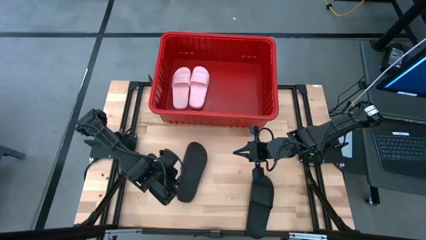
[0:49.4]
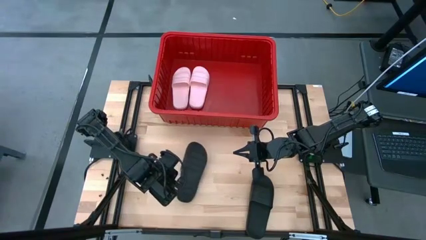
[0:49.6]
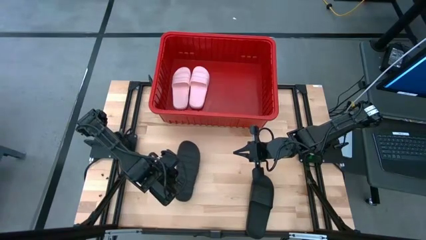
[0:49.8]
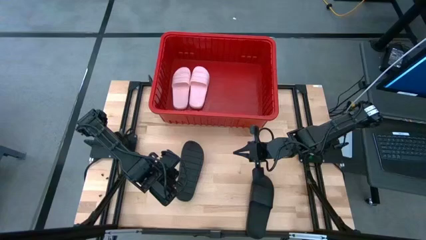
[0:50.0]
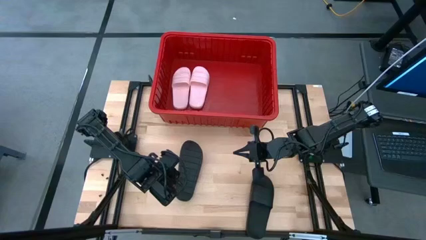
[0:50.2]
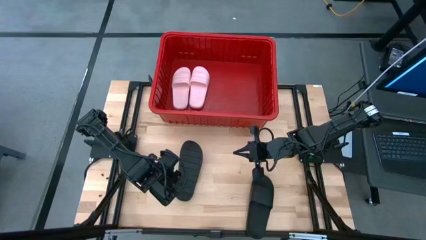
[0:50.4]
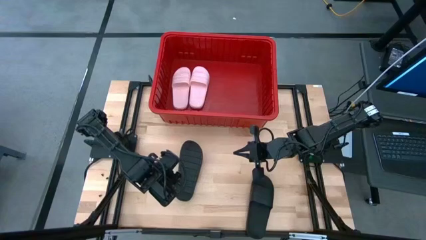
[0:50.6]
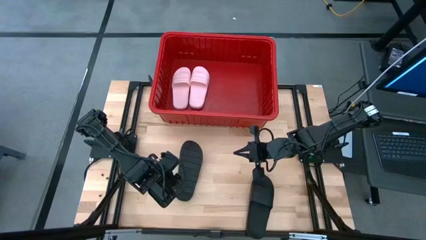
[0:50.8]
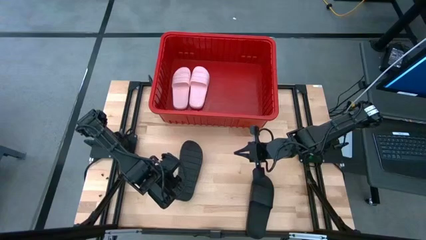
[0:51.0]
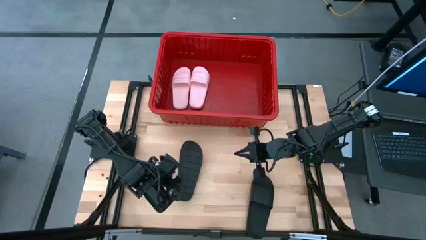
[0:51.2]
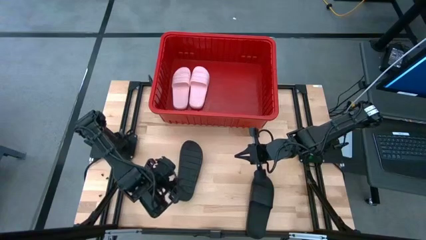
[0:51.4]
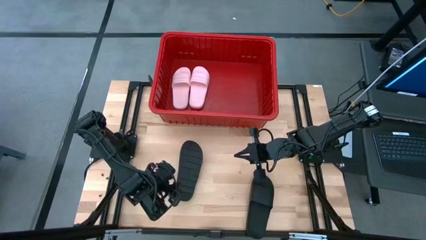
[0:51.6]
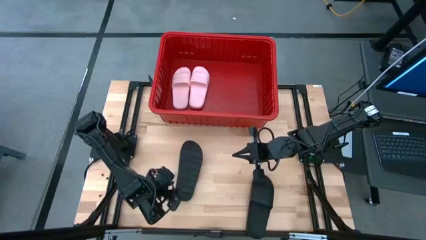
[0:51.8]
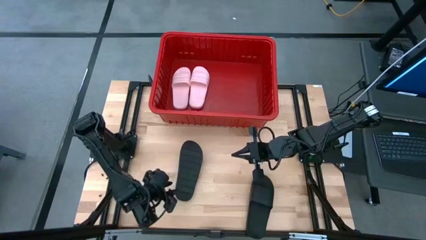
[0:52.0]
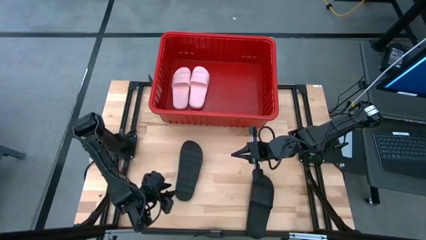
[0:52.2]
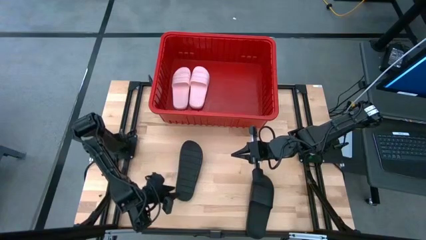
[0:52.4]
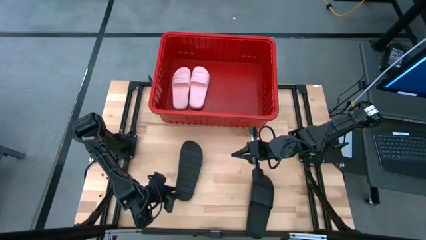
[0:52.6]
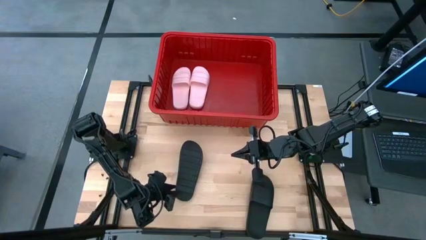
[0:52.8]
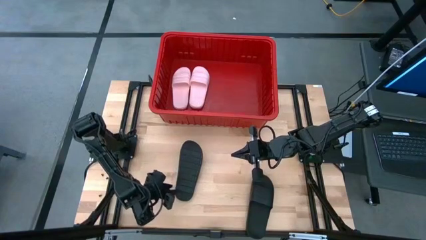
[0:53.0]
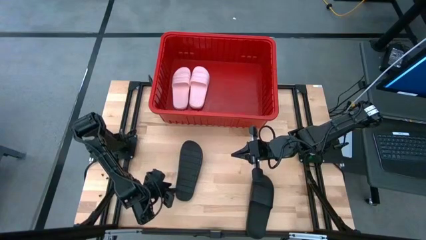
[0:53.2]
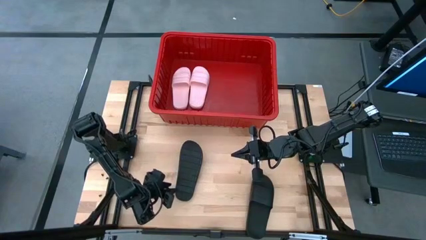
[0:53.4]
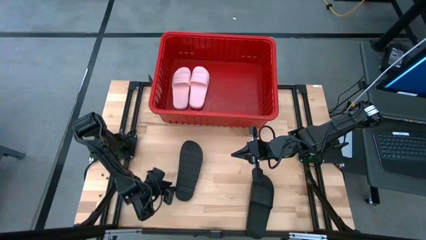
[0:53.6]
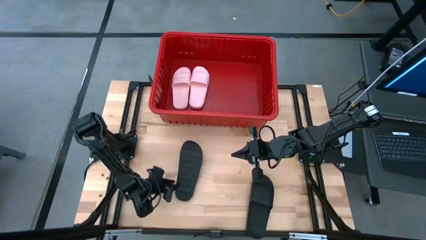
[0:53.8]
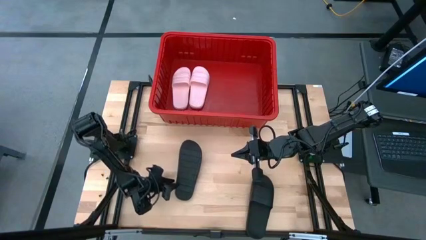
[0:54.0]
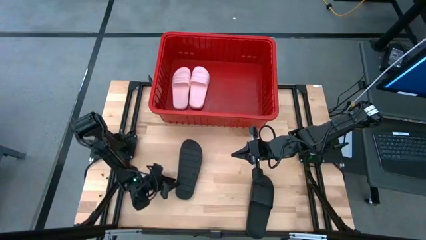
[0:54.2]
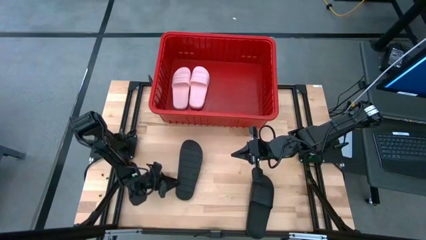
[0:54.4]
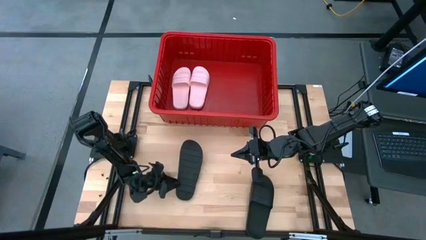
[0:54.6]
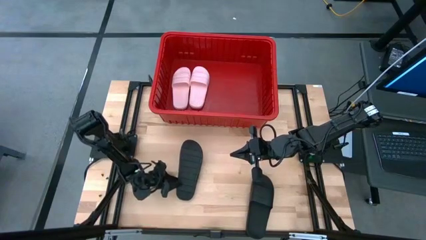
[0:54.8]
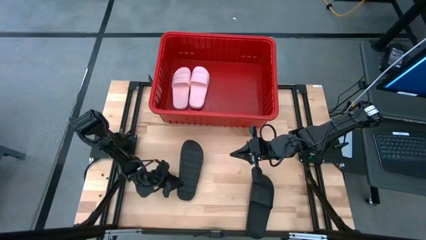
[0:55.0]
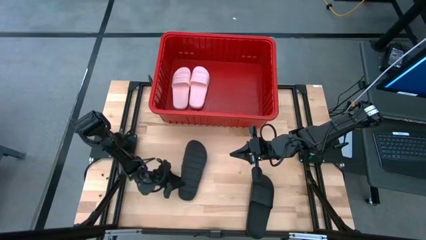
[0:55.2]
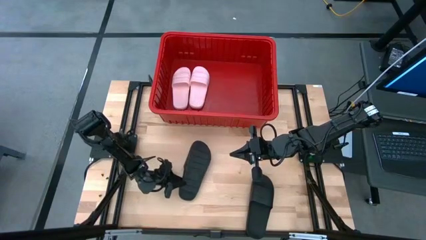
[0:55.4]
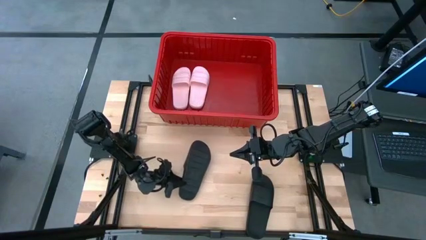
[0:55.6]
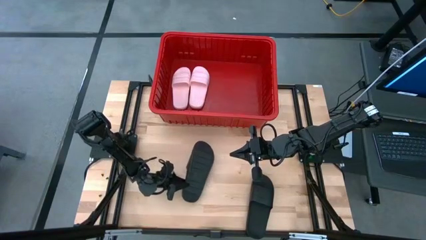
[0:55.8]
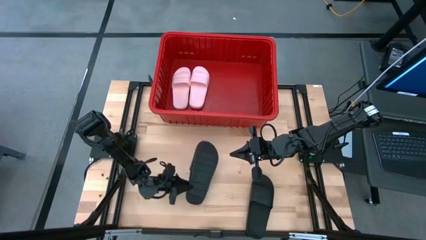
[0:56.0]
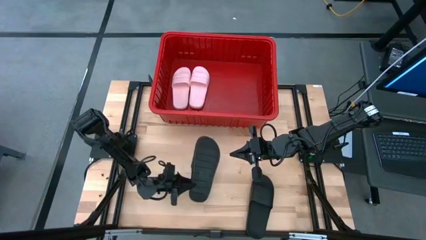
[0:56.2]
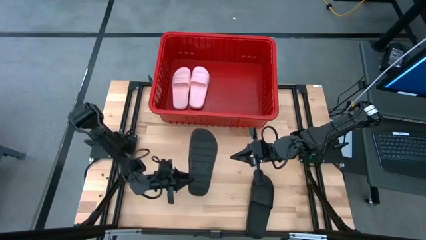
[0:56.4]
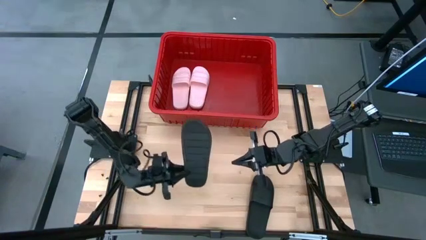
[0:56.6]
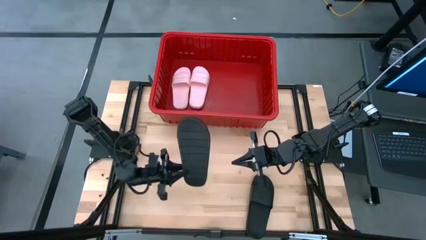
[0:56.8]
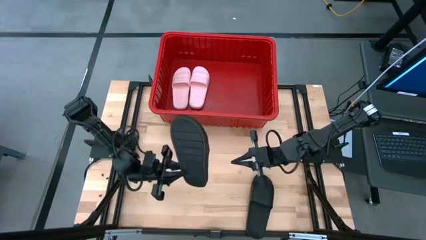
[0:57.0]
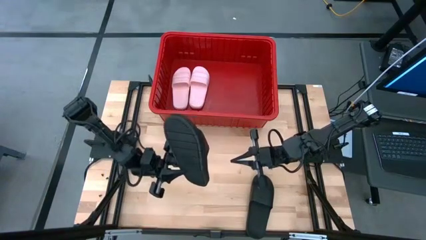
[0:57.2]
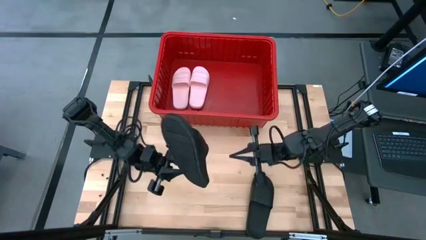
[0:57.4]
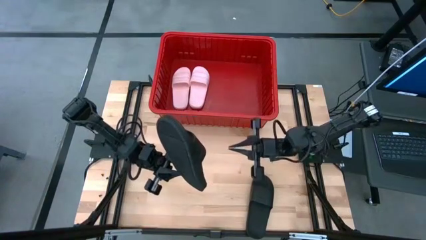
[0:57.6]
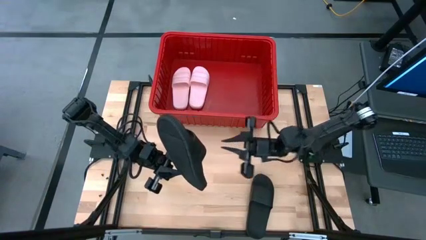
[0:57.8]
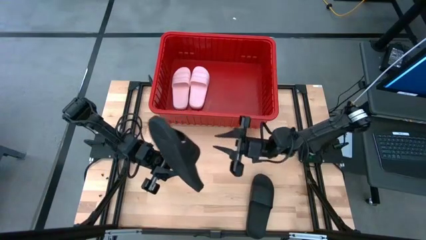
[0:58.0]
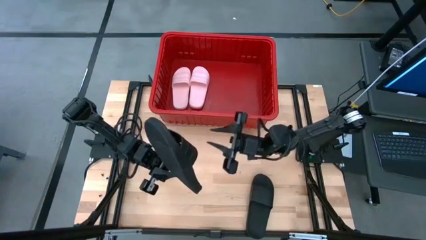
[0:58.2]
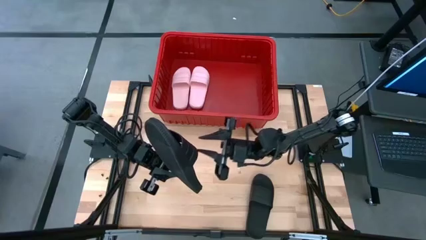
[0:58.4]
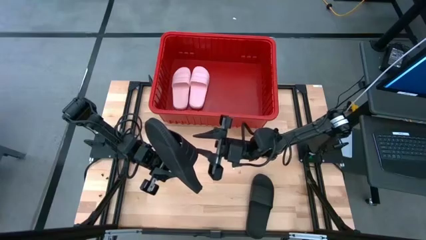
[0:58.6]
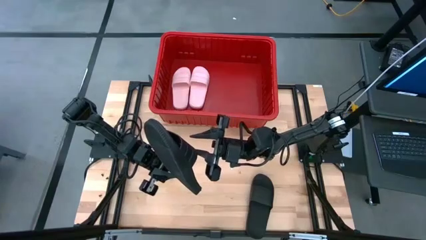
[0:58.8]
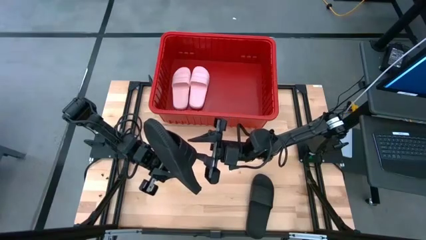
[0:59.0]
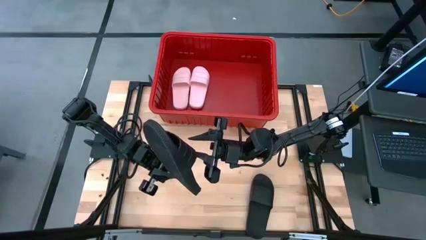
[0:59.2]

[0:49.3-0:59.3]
Task: Pick and place slides into bin
Put the left black slipper into the red bin

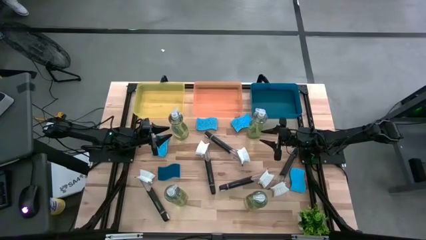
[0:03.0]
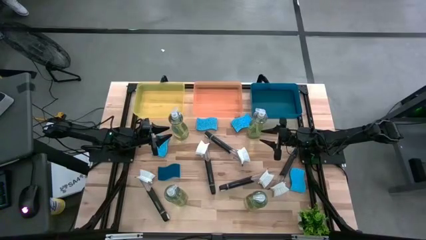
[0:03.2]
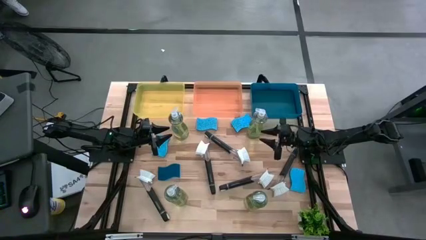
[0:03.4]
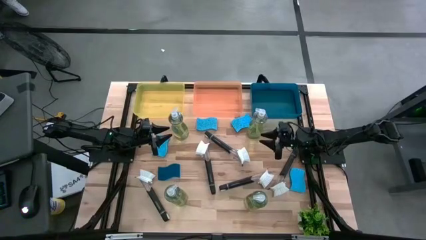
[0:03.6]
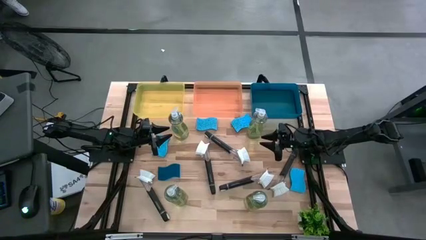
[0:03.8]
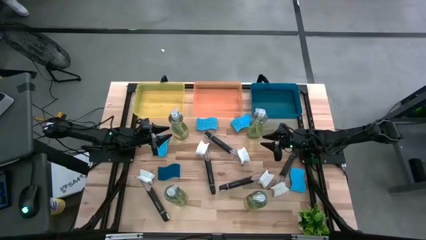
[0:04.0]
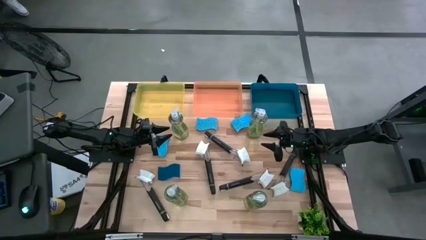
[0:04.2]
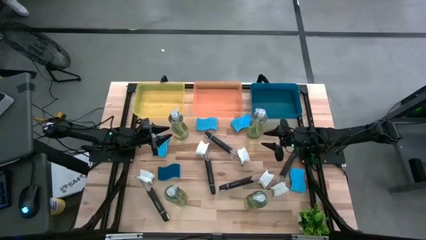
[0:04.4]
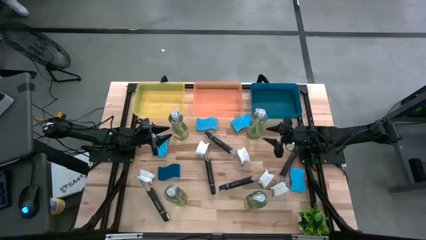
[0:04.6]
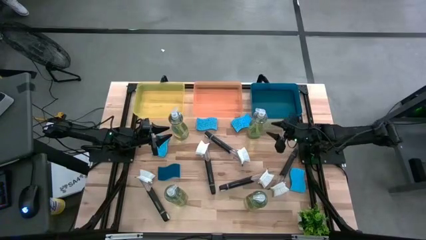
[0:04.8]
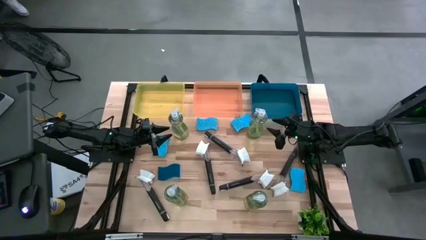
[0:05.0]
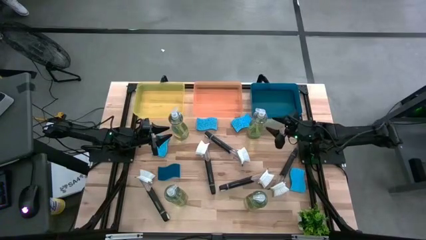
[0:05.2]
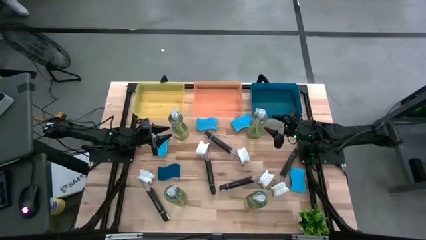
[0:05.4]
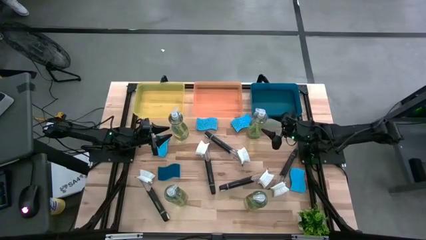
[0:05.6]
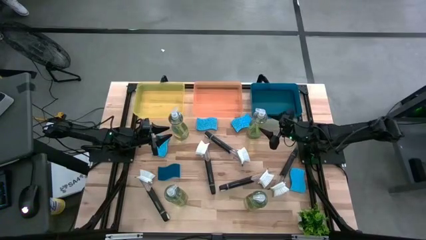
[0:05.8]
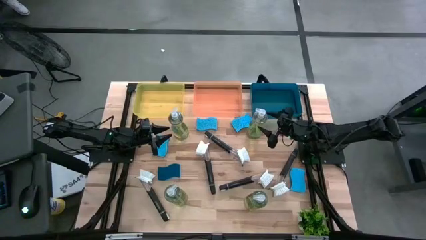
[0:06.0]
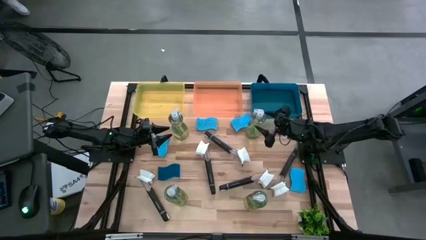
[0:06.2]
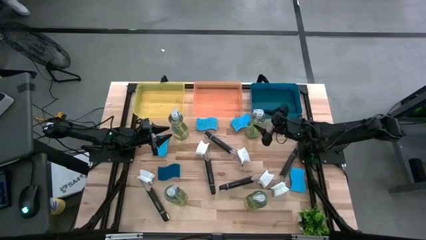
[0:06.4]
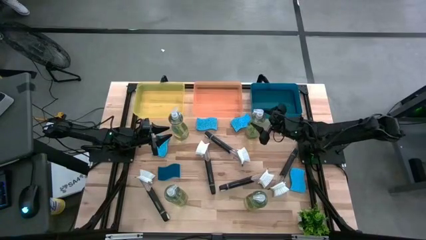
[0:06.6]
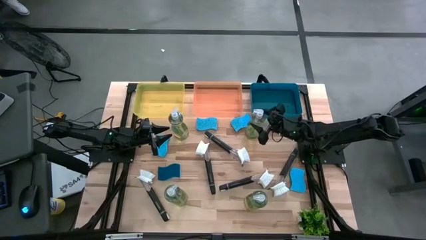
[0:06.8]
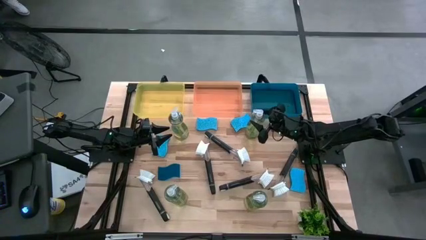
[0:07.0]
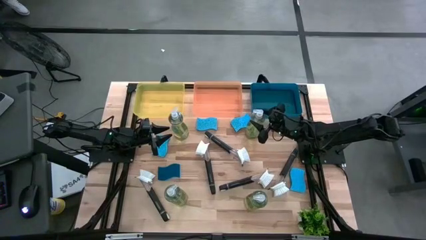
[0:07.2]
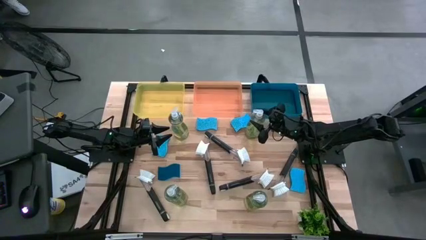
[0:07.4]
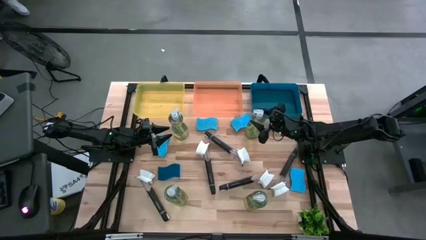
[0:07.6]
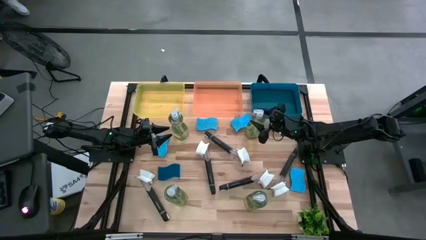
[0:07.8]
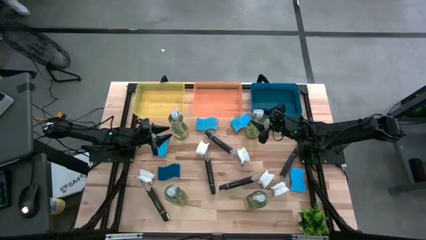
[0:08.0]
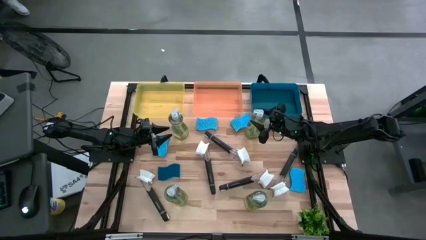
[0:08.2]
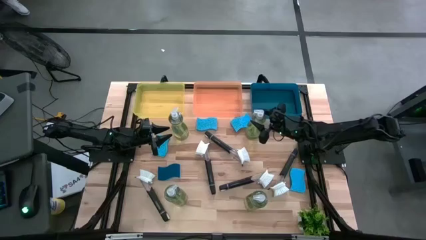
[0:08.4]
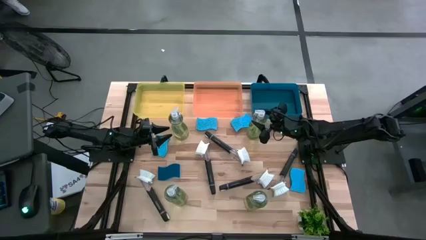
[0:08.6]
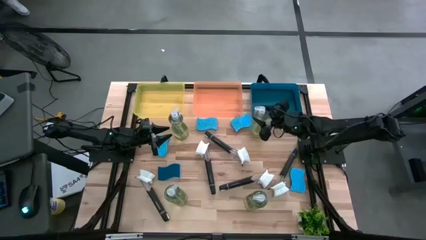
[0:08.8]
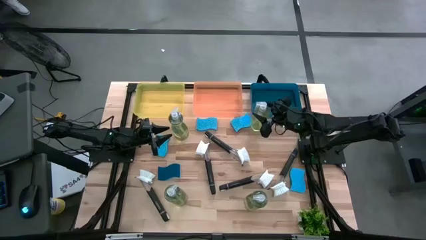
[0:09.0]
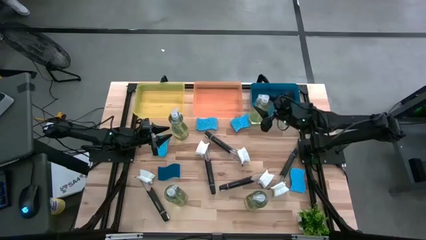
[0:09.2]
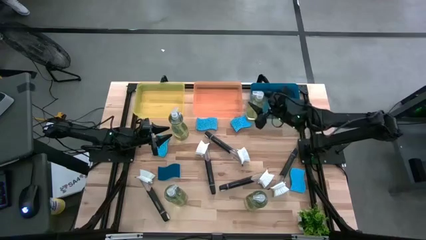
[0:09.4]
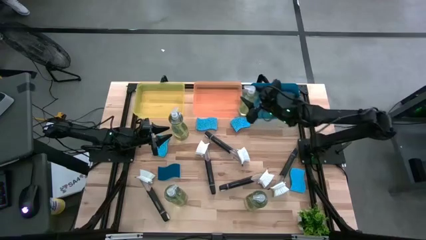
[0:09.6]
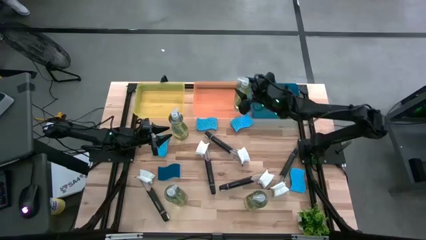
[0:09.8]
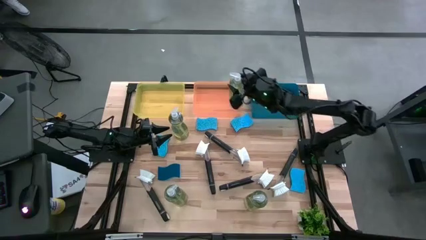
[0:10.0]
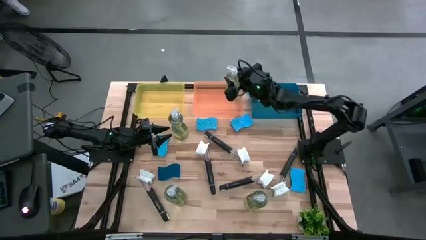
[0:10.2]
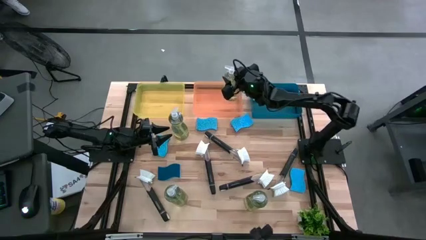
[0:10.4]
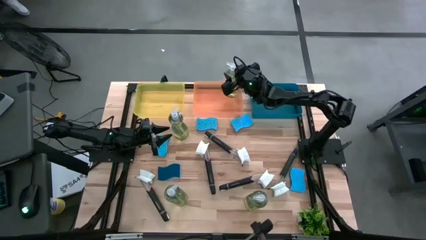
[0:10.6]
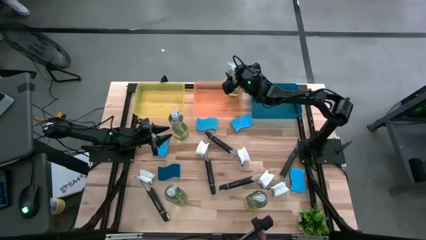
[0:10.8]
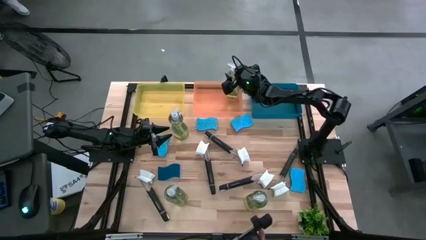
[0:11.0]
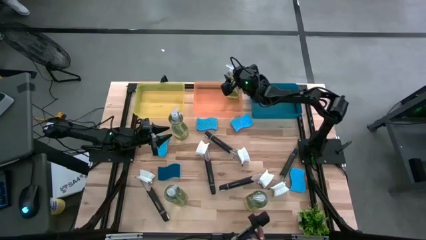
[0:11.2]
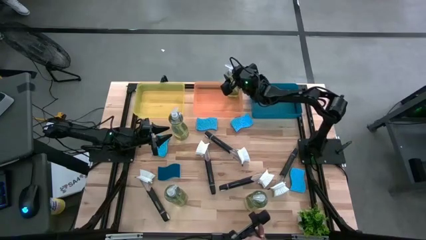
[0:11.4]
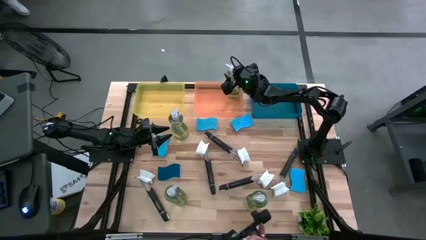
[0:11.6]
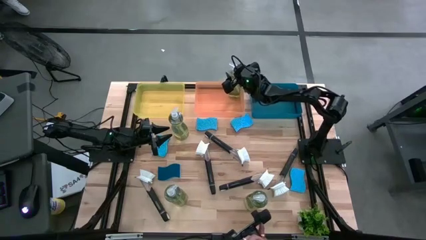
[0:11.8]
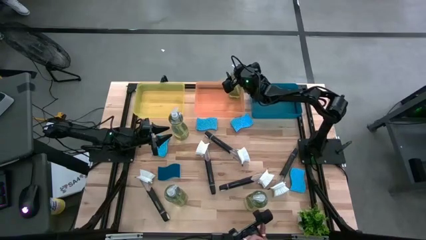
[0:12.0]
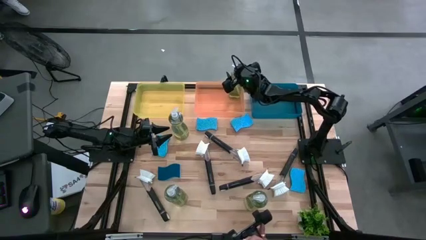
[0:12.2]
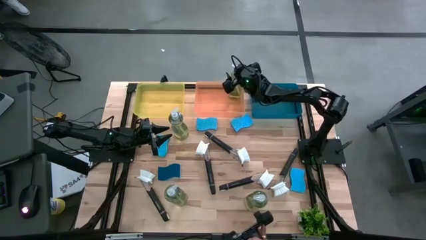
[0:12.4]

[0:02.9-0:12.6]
Task: Pick & Place Kitchen Sink Supplies
Put the transparent soap dispenser into the orange bin
